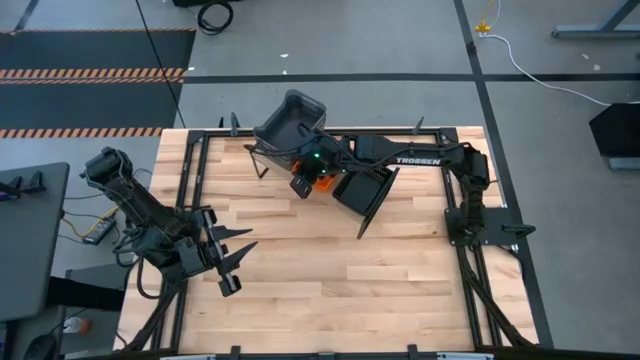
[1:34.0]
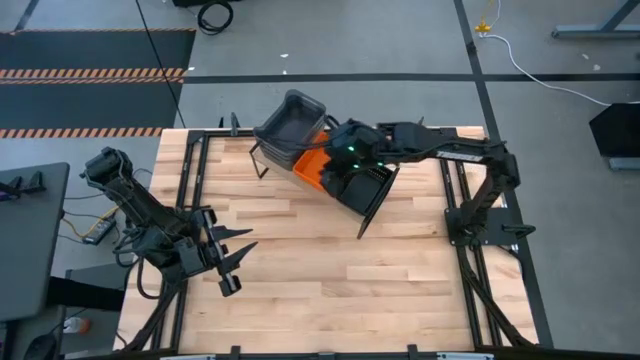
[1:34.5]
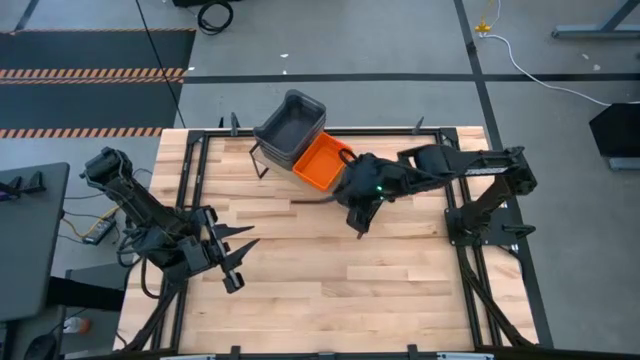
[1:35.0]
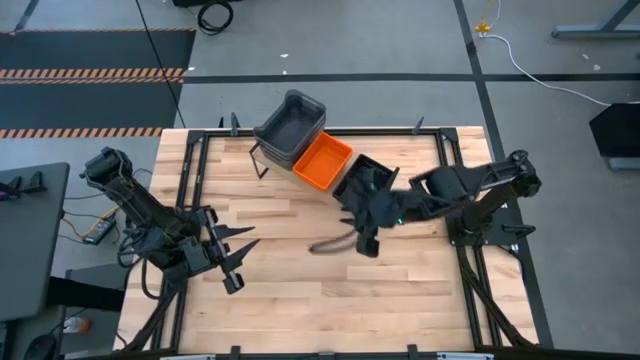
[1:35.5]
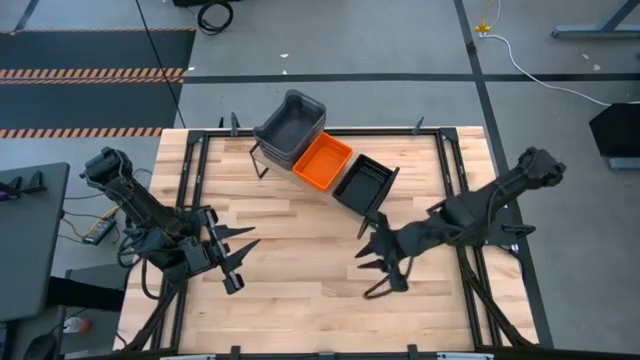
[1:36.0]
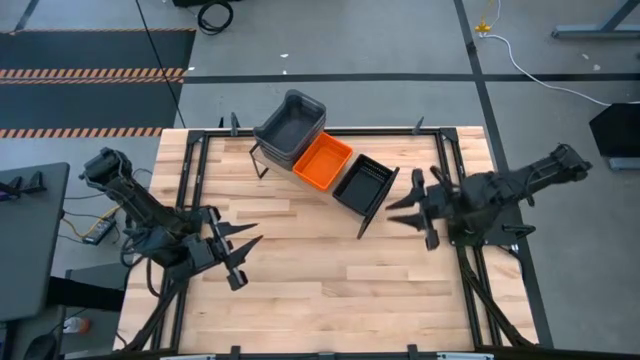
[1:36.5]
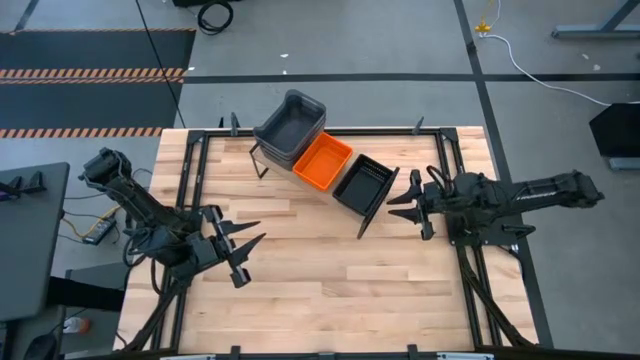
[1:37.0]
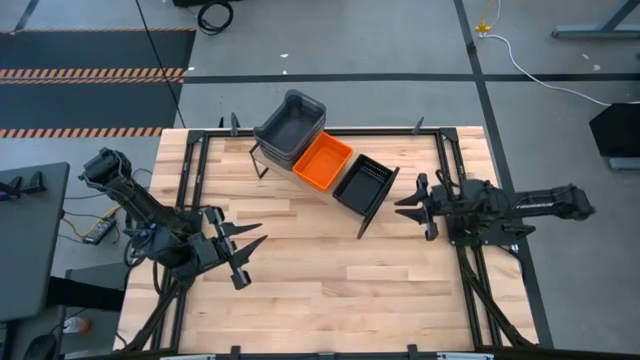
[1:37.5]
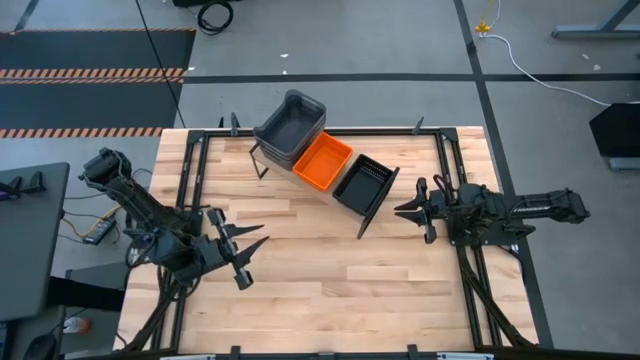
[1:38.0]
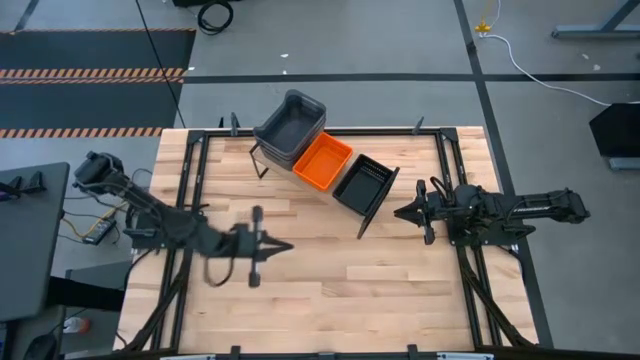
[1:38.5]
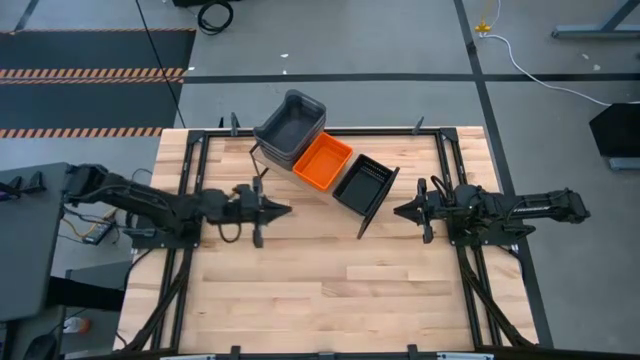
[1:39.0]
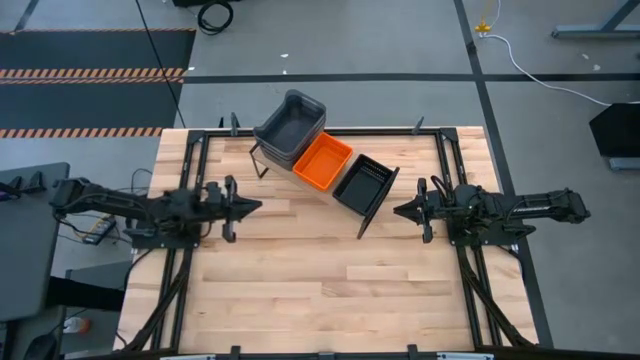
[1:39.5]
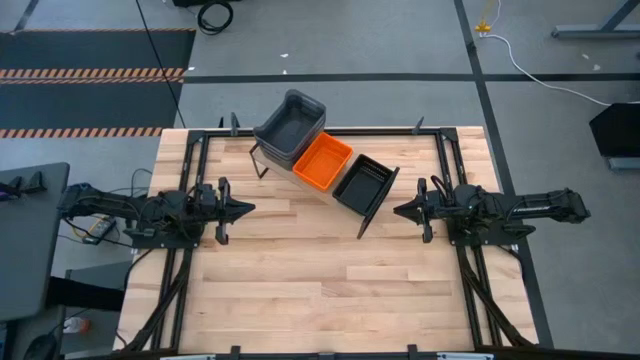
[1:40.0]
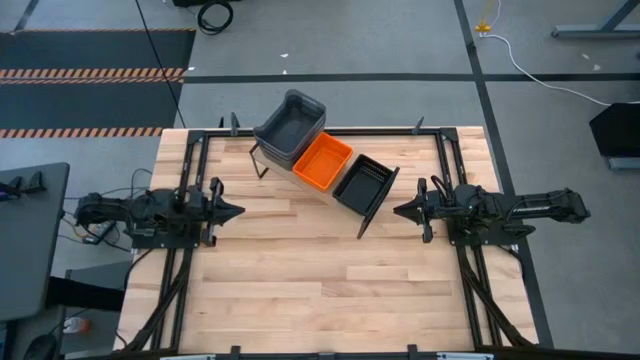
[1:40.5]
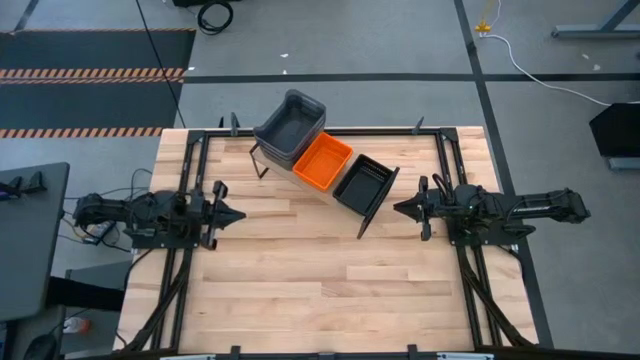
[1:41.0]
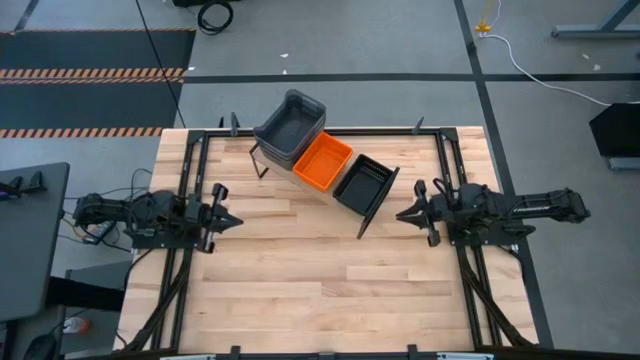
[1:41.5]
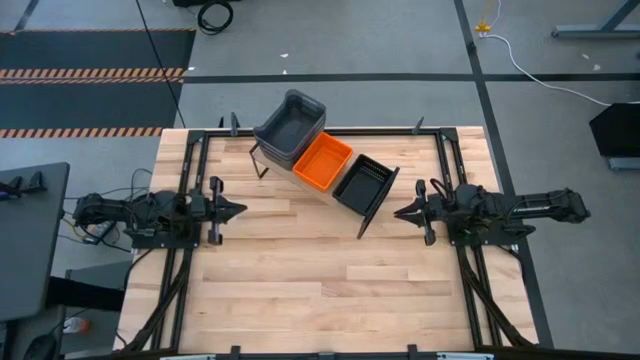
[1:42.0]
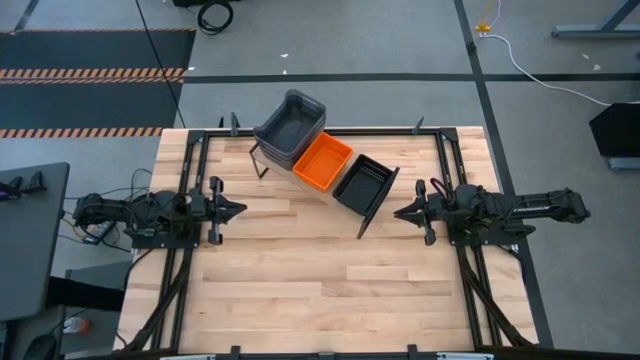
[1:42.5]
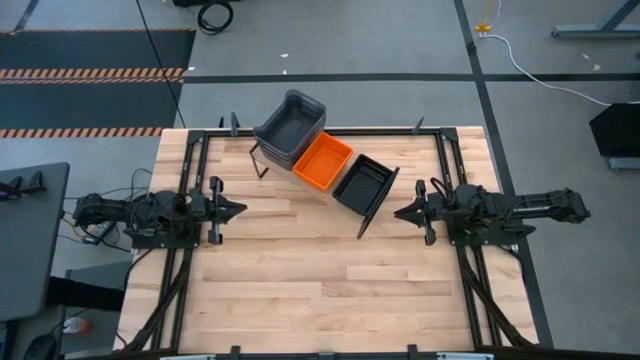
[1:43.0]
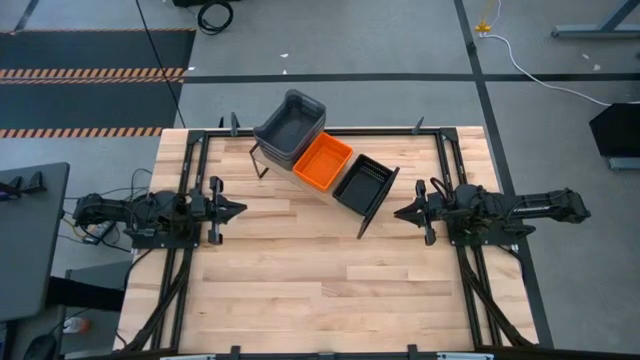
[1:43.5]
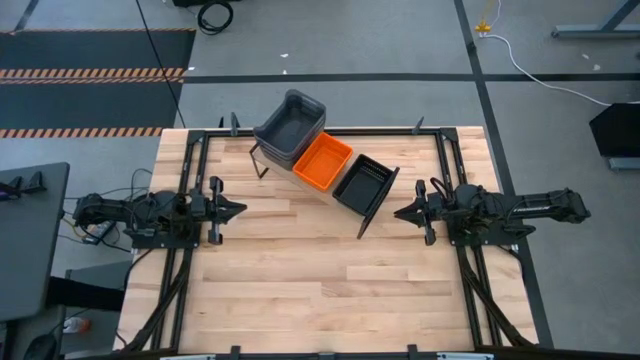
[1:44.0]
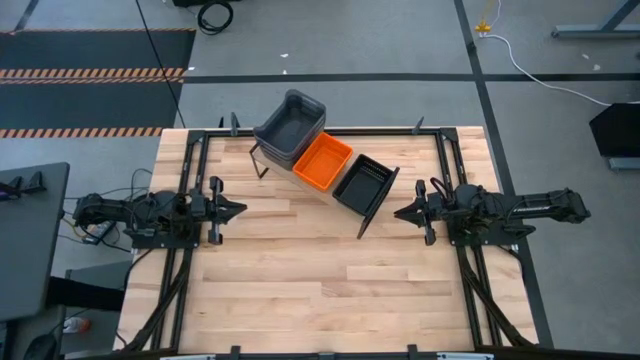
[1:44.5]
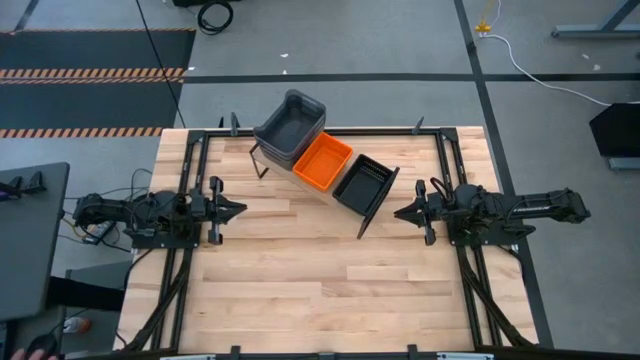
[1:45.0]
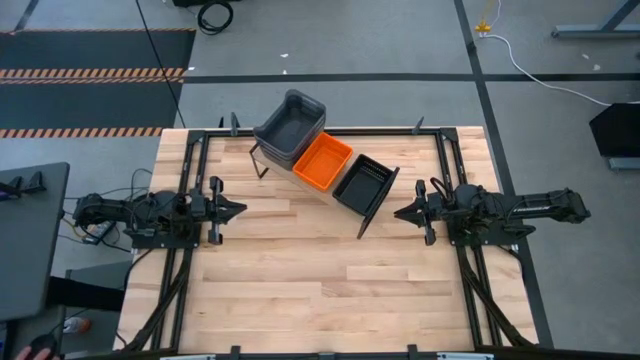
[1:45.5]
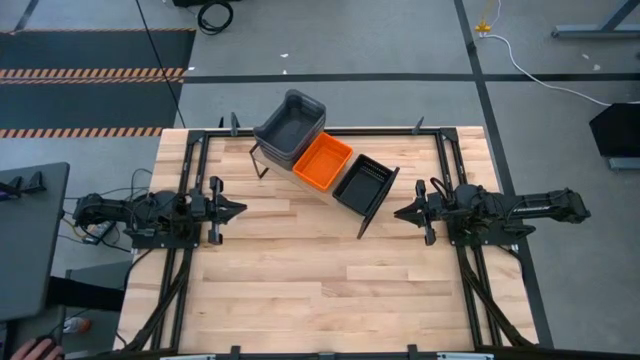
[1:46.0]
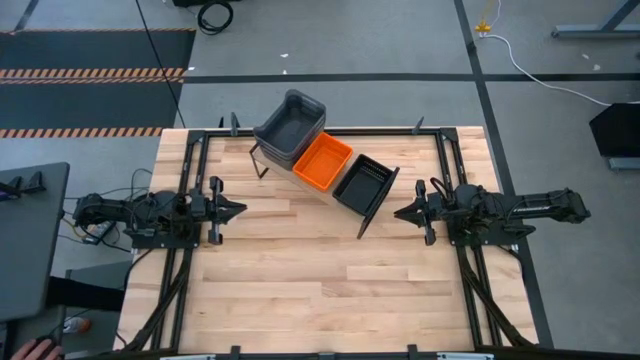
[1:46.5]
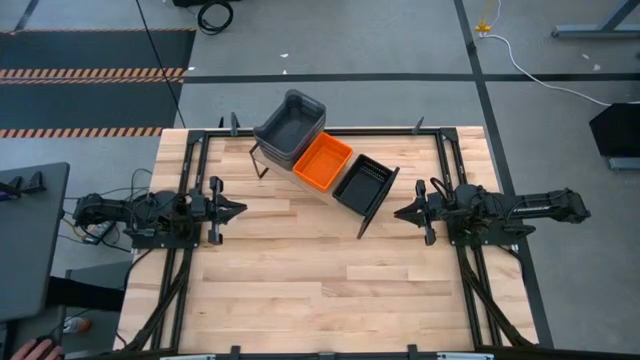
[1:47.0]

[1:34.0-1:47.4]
Task: Stack baskets on shelf by color
Return to Home Position

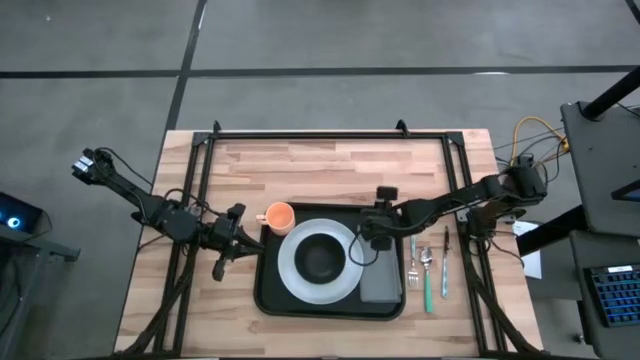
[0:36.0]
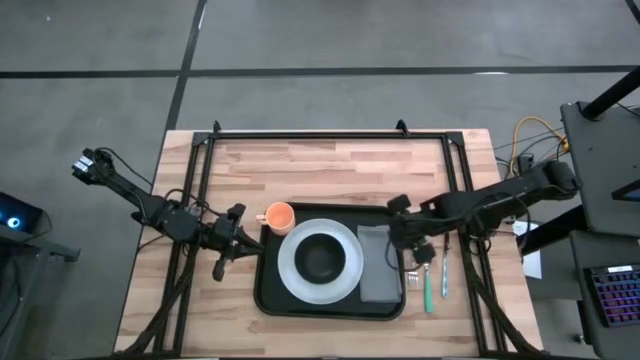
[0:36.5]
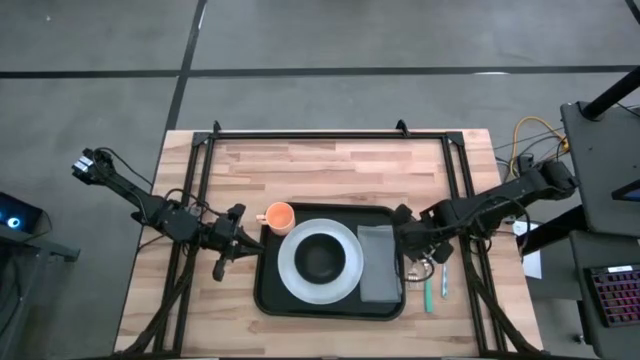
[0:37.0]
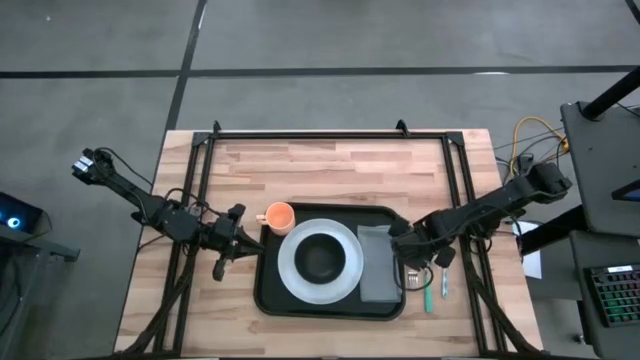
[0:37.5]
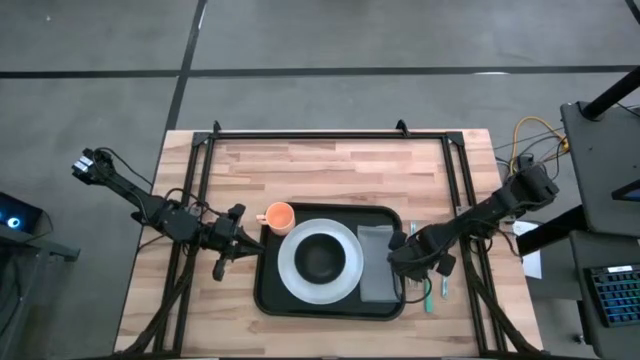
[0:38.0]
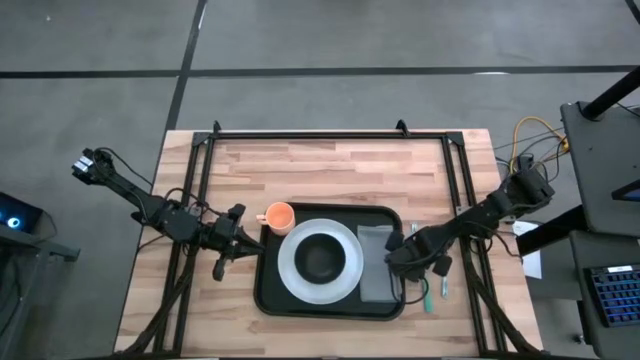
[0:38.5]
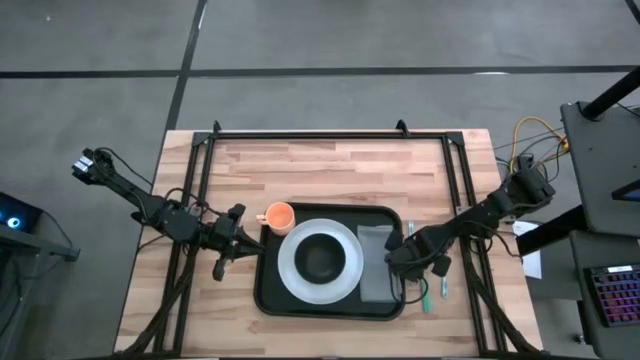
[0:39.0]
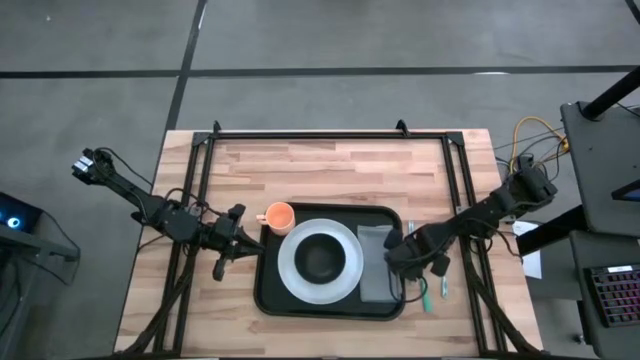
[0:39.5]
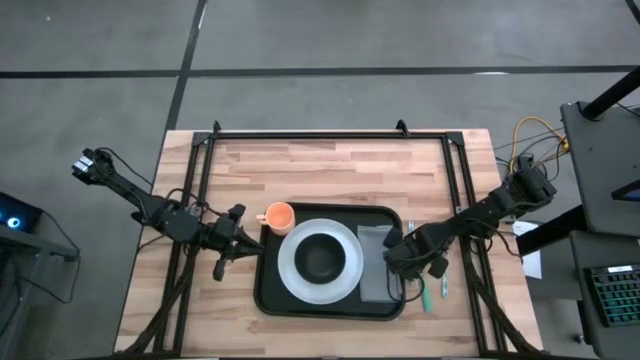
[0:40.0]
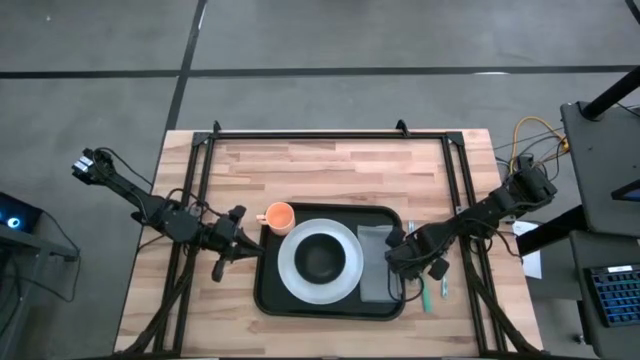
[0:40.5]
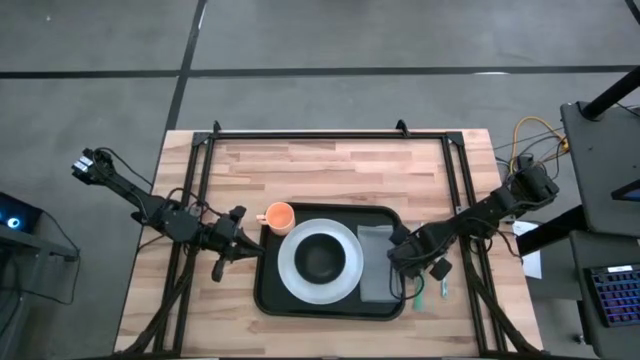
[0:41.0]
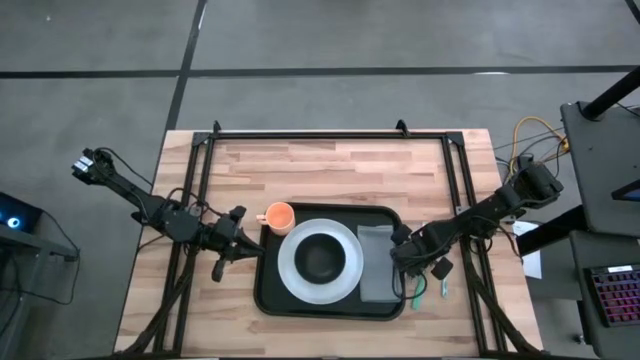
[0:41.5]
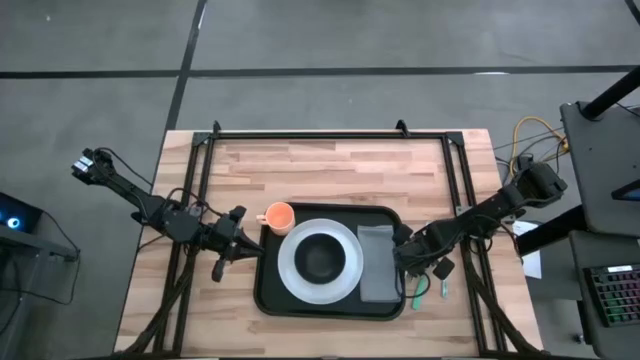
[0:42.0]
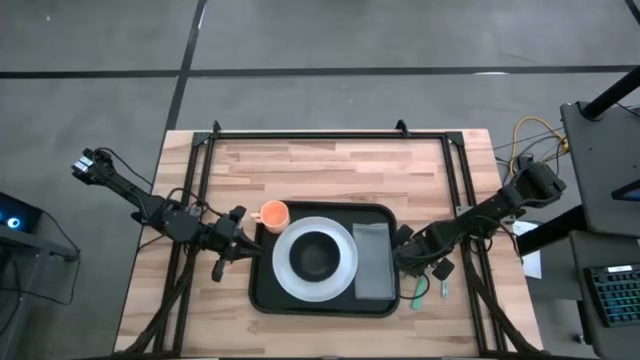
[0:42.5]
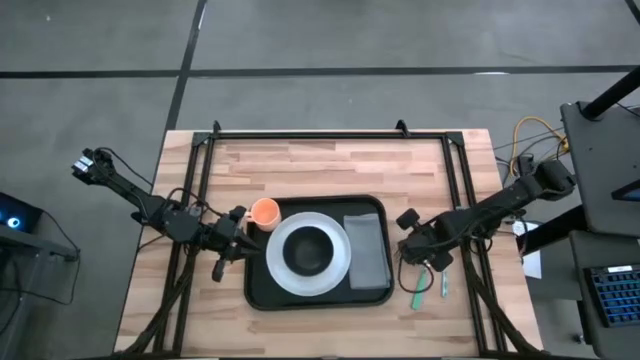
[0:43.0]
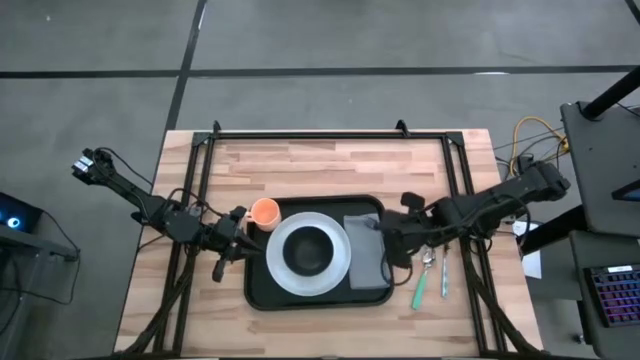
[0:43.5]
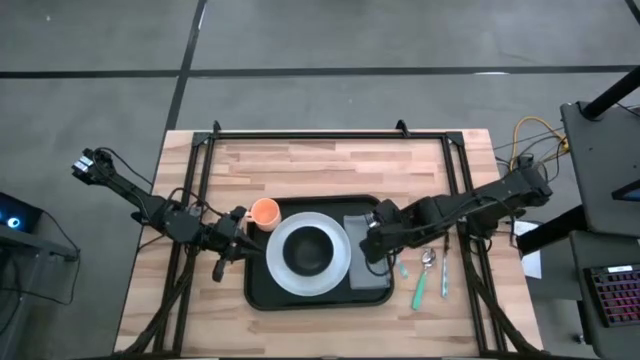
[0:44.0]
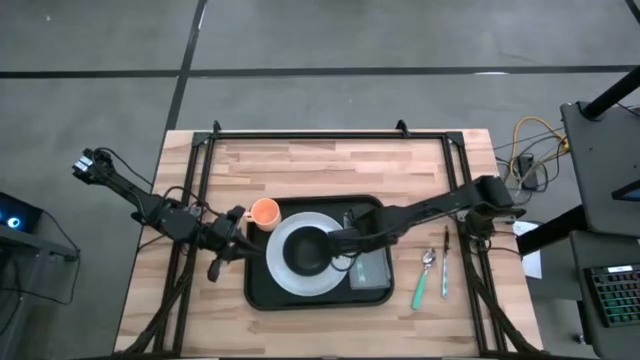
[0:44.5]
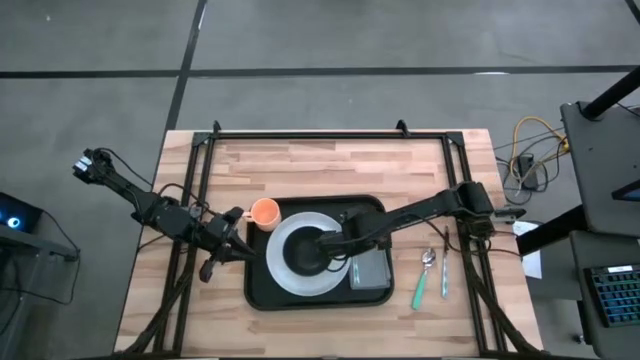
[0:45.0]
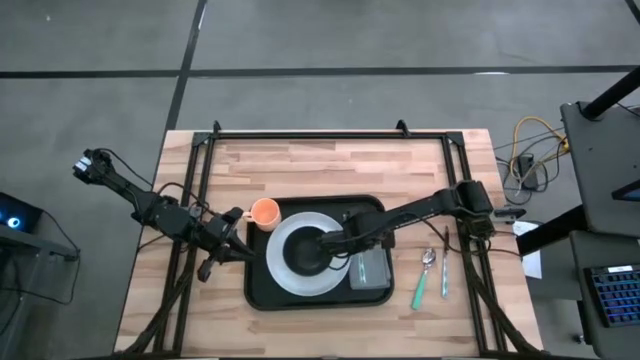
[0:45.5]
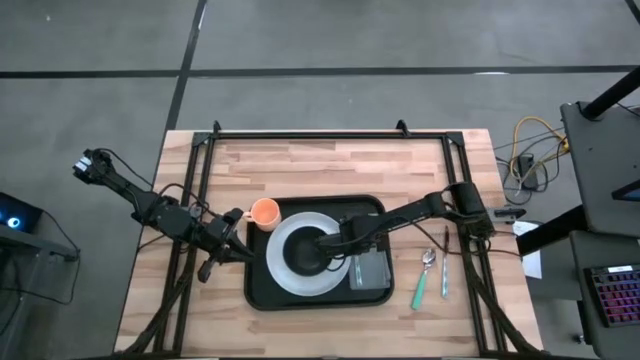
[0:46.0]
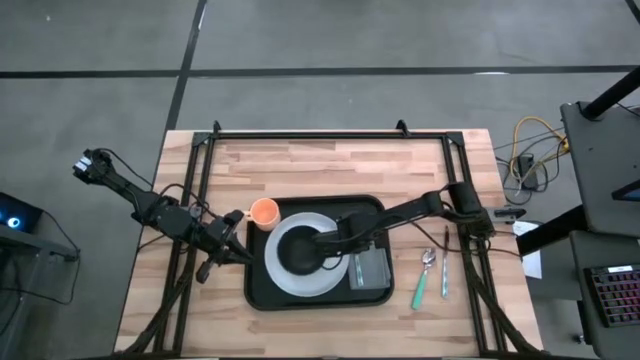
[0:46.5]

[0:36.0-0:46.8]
Task: Set up tray
Put the green fork on the gray napkin
